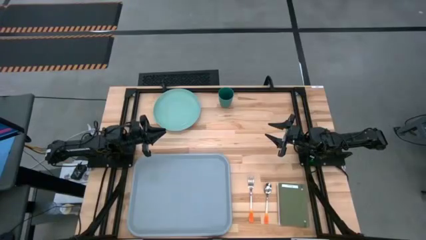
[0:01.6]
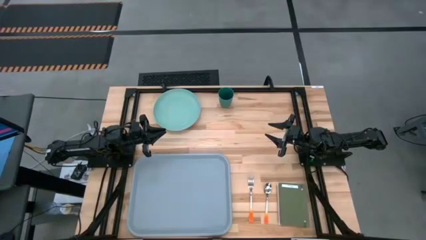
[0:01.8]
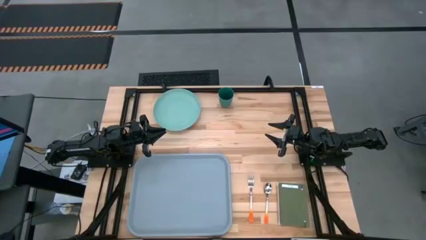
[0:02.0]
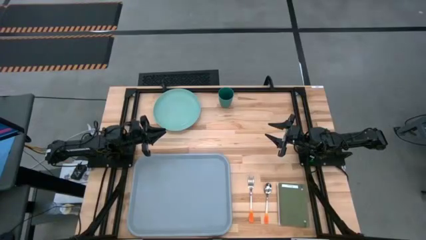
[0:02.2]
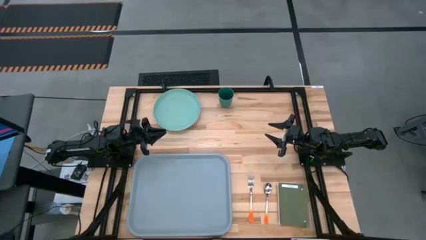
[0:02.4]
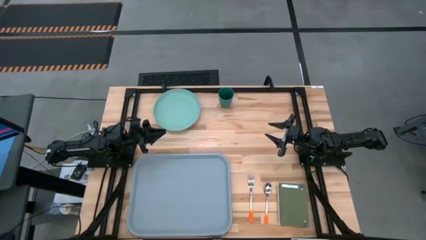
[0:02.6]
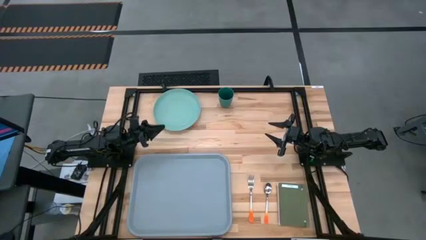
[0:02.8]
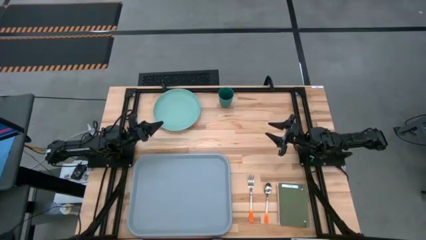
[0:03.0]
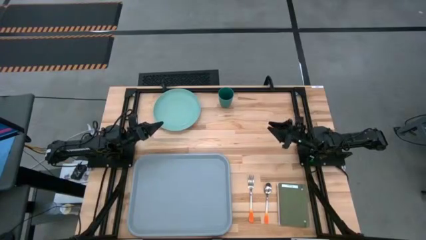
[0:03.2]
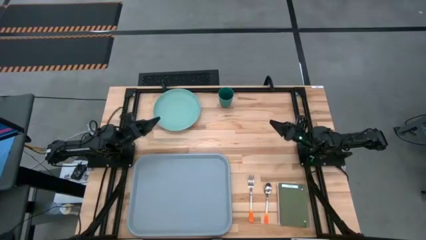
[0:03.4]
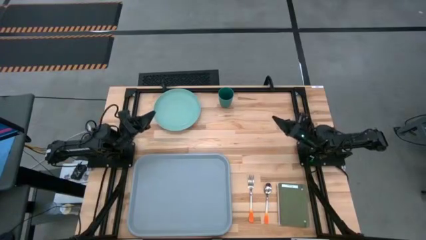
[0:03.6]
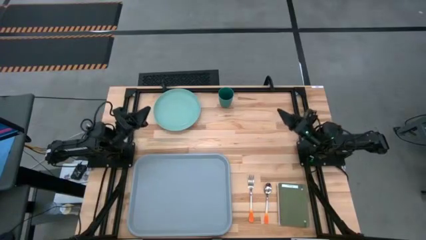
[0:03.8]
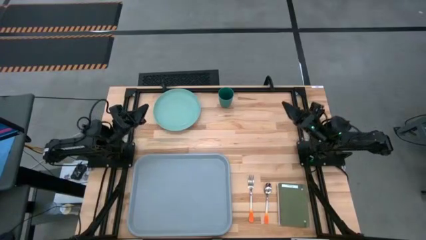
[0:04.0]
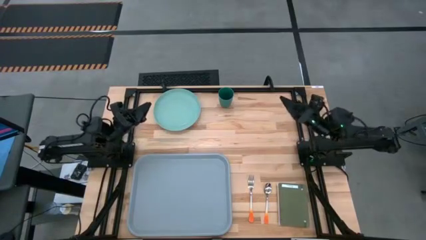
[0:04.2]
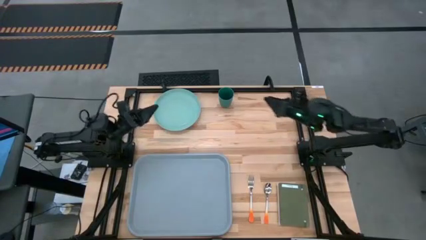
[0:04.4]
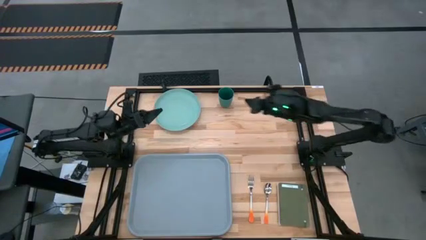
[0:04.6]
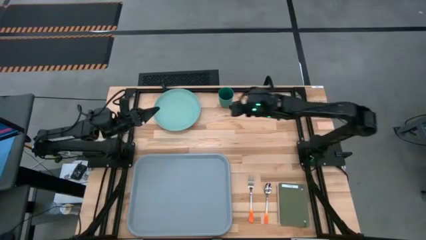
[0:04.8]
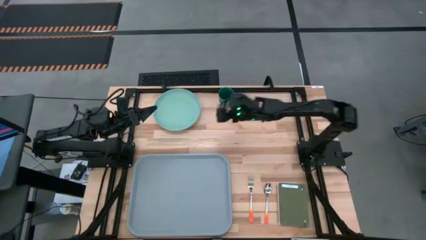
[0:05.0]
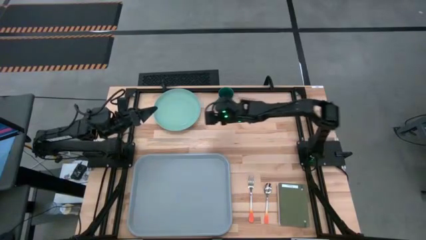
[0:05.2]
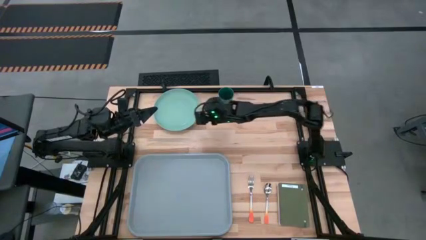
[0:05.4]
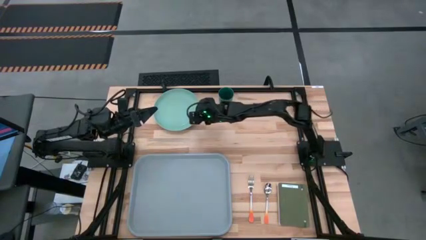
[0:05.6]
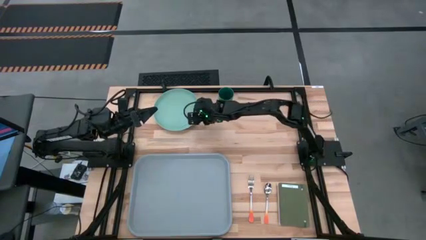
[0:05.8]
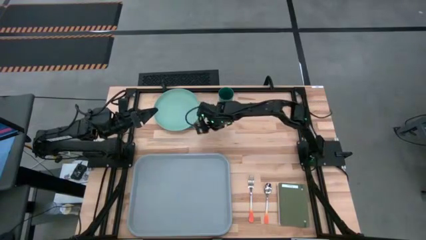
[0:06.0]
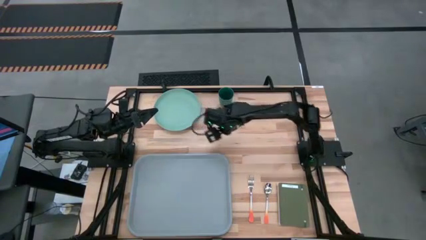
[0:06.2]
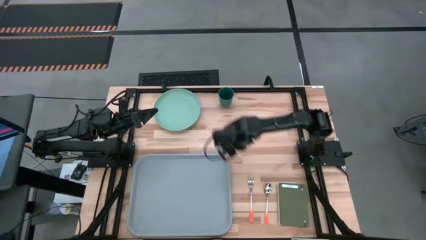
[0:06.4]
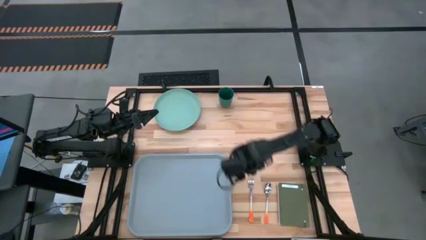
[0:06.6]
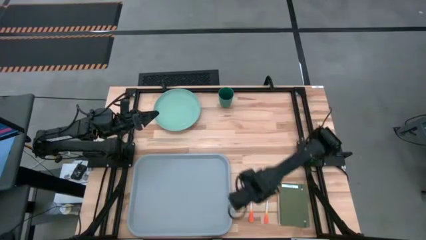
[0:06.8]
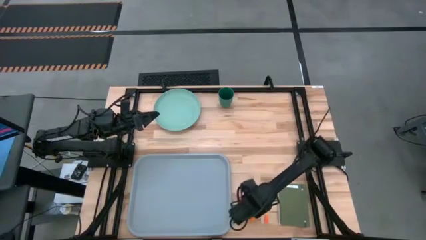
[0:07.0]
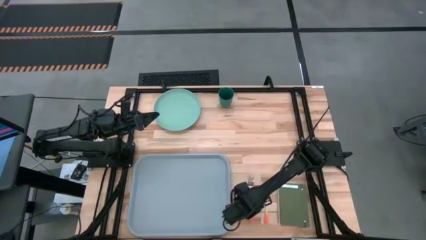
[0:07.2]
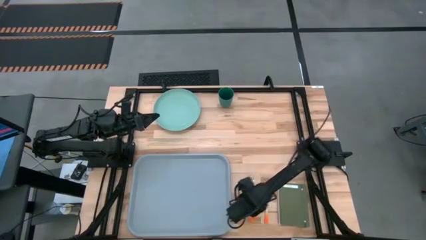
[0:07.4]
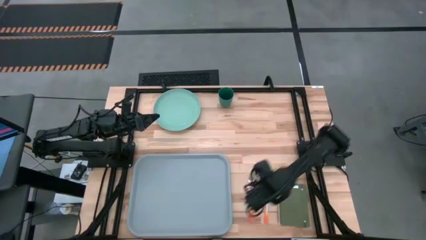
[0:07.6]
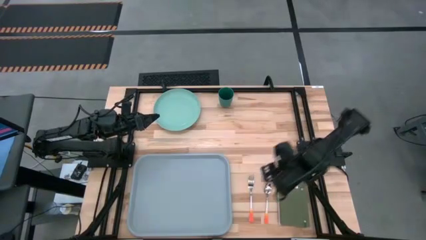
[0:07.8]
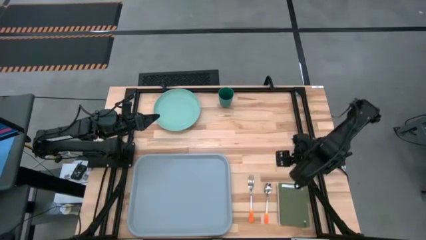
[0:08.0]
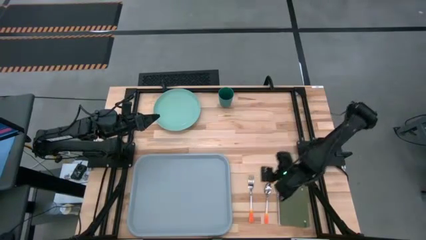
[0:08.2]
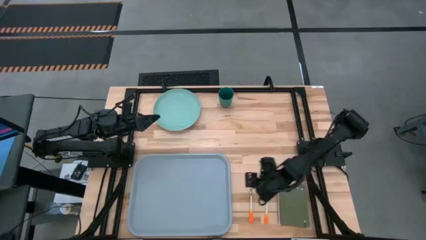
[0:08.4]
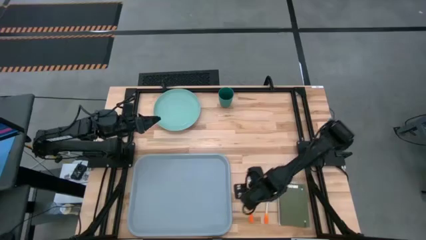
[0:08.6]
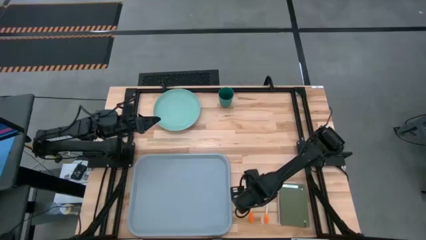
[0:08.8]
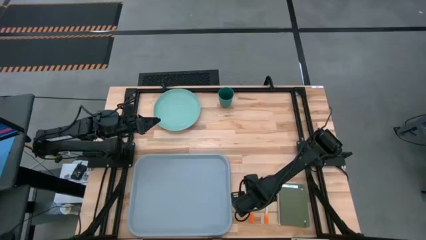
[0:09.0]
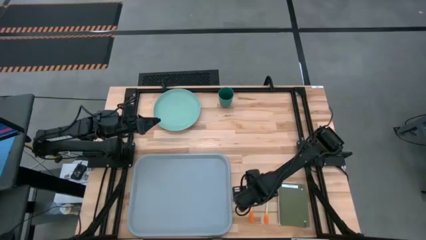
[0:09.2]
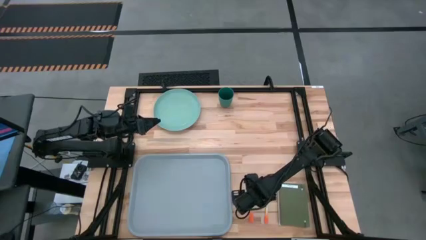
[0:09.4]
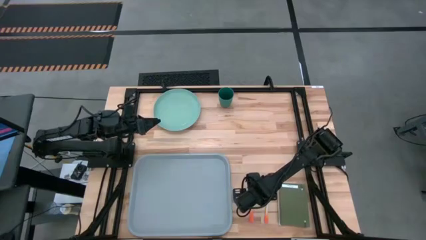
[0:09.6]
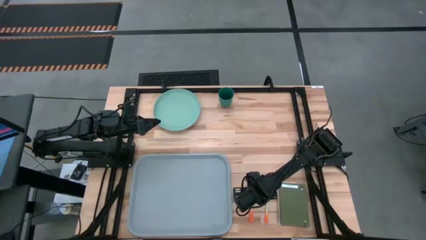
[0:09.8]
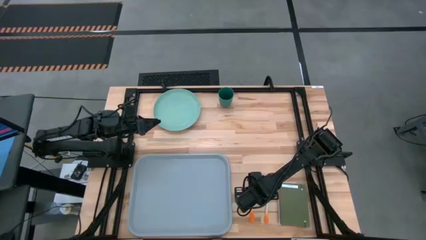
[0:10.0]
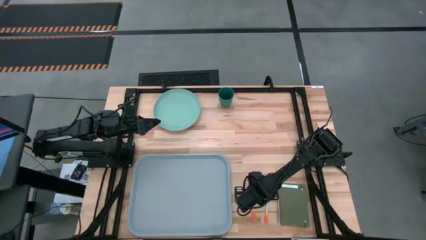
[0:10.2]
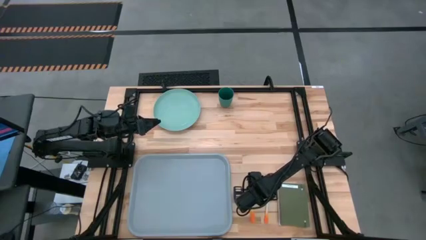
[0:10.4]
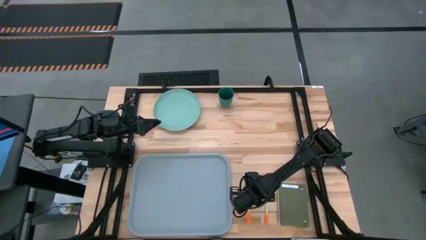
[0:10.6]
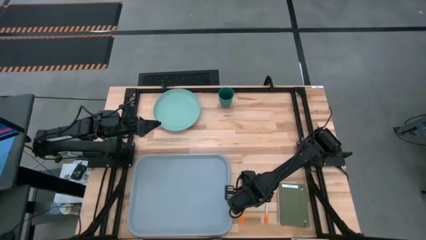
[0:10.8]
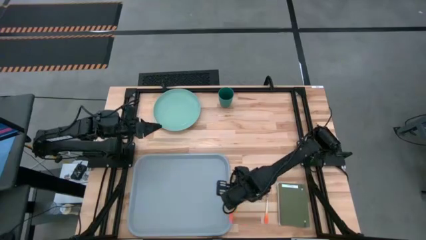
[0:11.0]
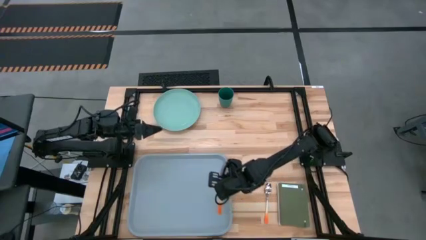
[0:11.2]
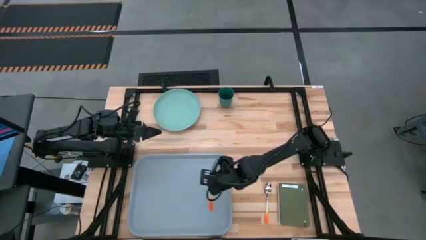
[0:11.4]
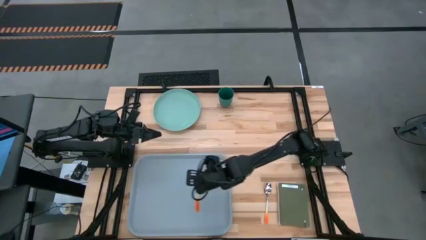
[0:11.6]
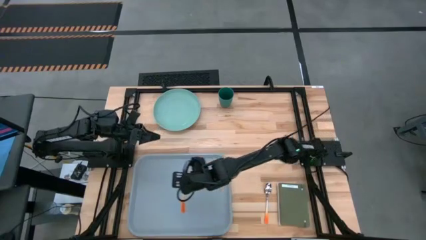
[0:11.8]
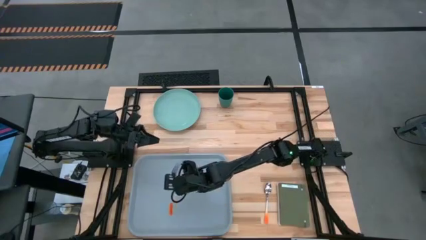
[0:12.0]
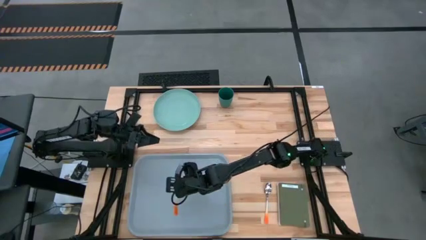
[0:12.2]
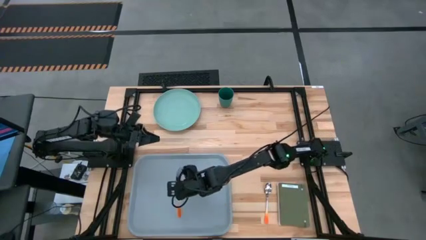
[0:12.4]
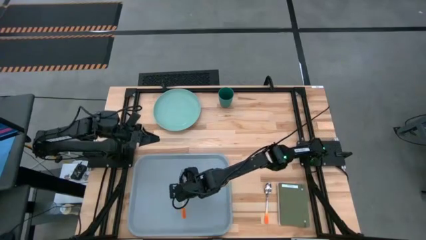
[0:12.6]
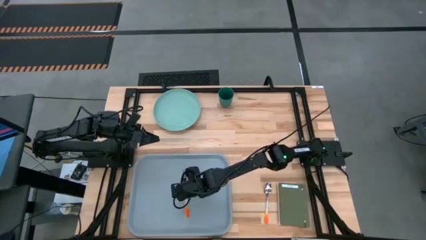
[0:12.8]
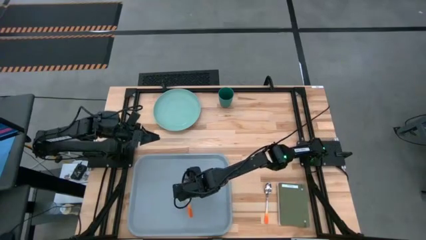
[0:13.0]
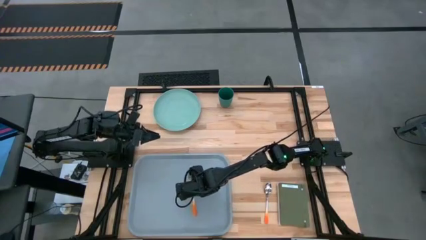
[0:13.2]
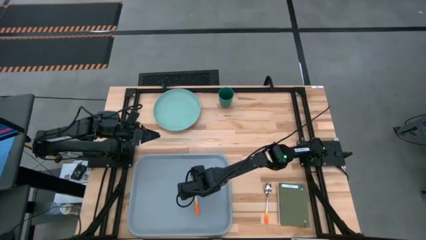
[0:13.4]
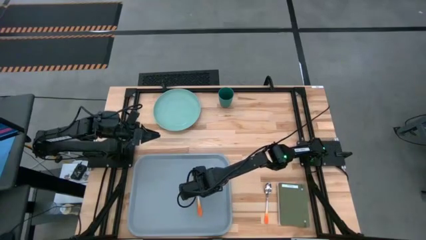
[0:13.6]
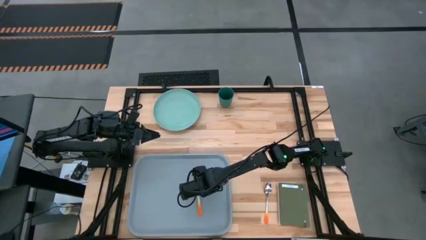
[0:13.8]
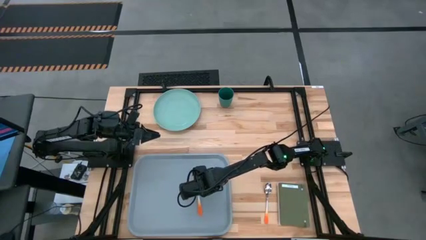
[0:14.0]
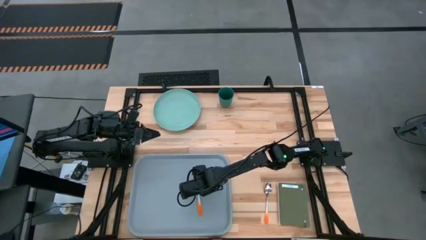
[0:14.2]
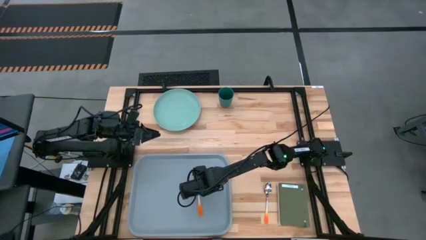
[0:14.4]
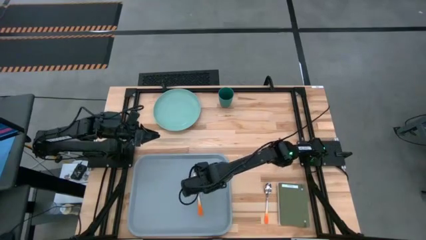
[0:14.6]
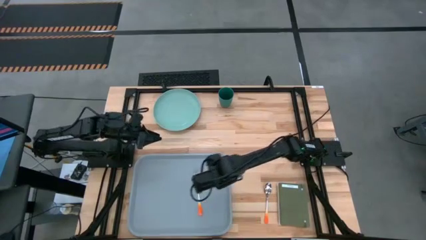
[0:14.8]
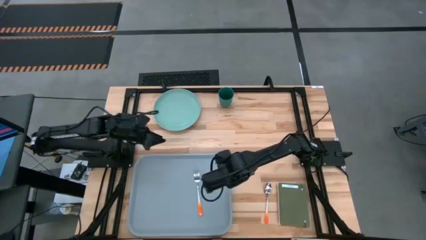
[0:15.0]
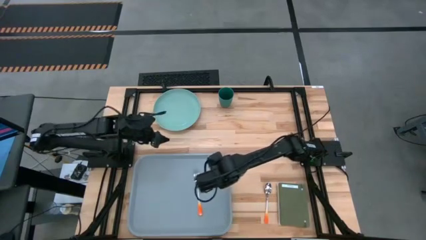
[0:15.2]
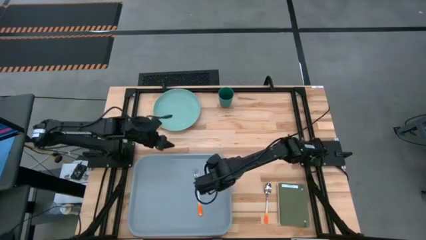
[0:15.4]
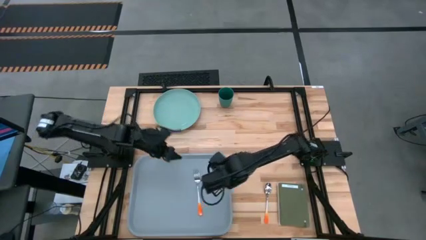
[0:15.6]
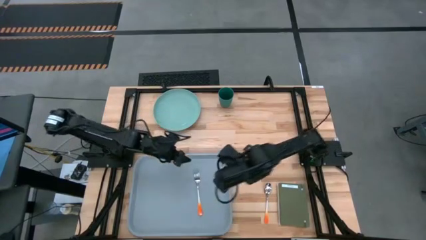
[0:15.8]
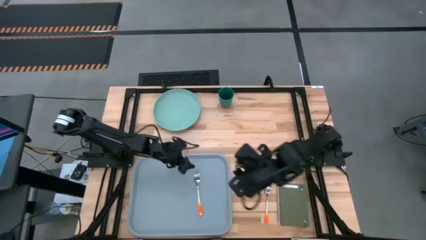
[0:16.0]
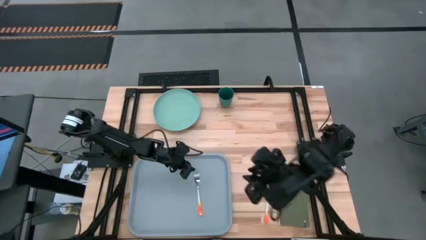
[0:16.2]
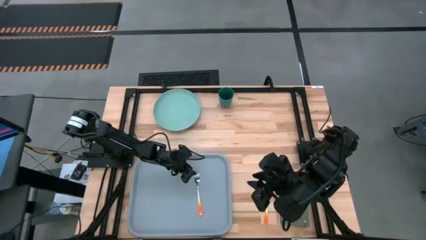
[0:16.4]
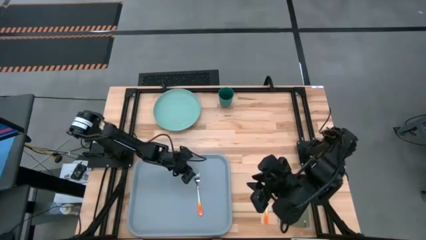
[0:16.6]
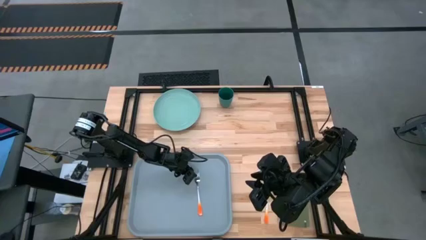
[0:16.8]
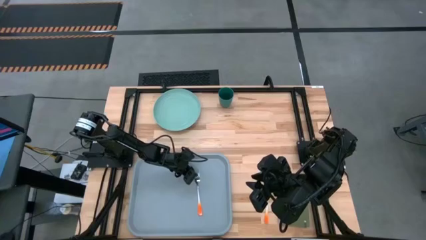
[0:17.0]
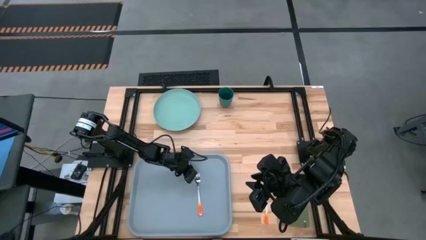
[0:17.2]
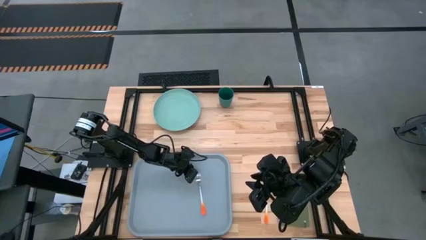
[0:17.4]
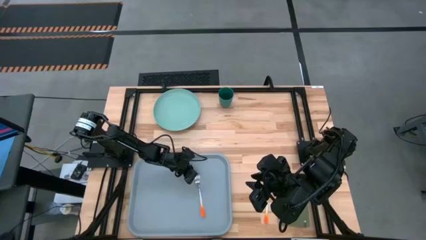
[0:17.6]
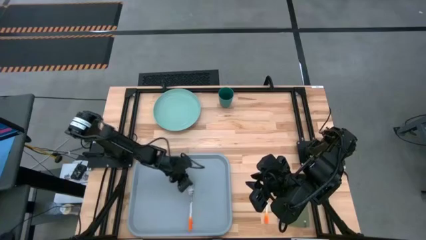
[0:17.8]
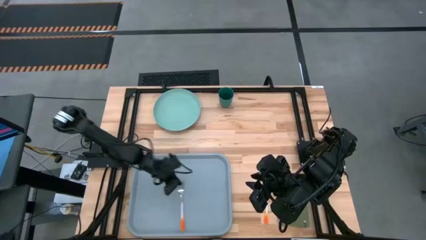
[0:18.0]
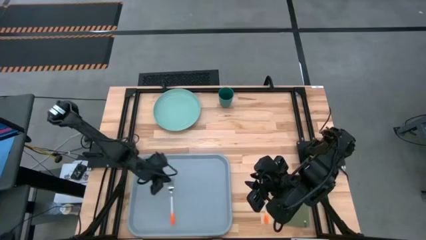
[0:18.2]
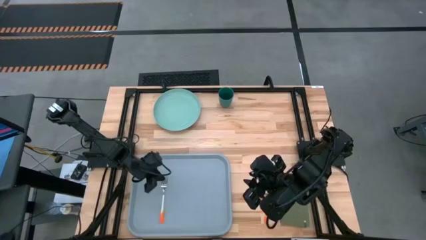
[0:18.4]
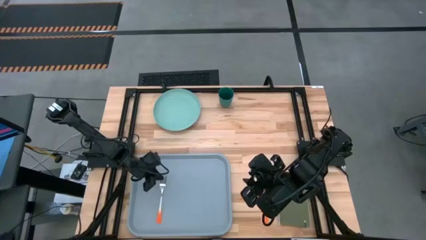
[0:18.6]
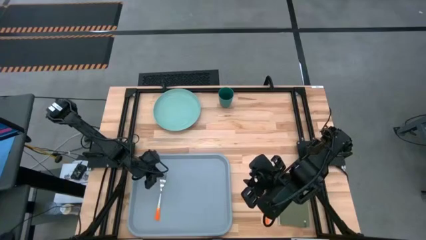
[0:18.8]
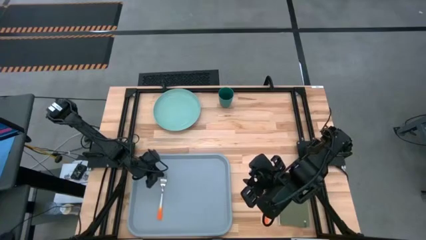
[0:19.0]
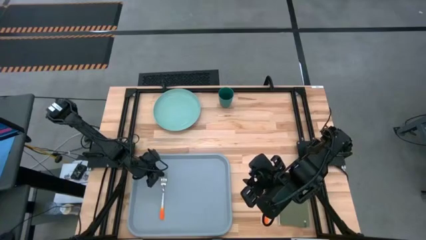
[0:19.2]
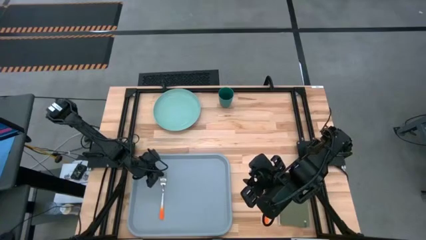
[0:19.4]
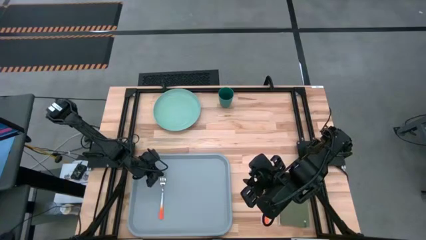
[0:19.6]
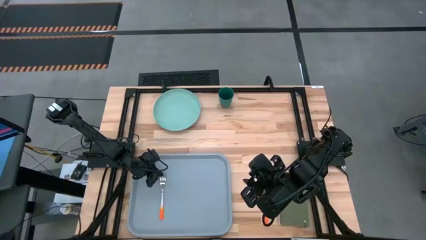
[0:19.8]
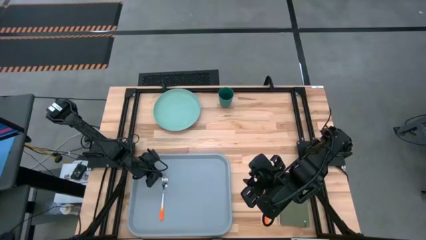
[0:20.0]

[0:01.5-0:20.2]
Task: Pick and place plate/cup/fork/spoon on tray
Put the orange fork on the left of the gray tray
